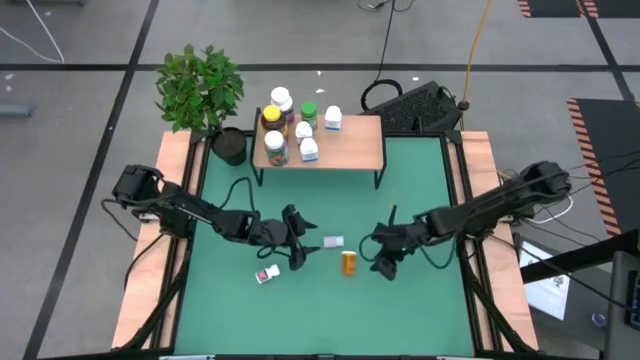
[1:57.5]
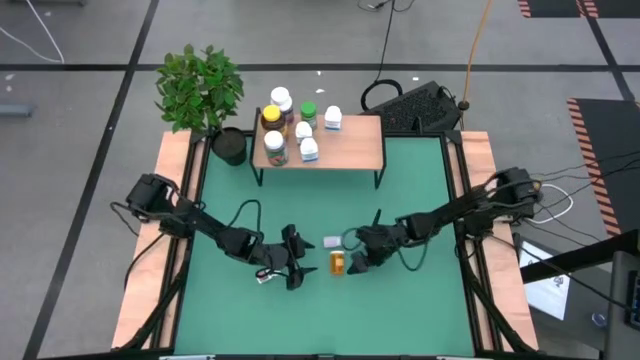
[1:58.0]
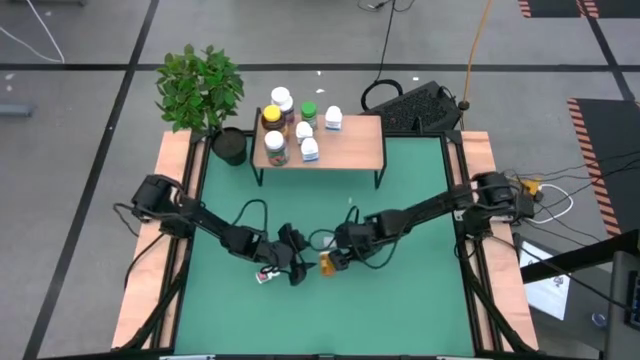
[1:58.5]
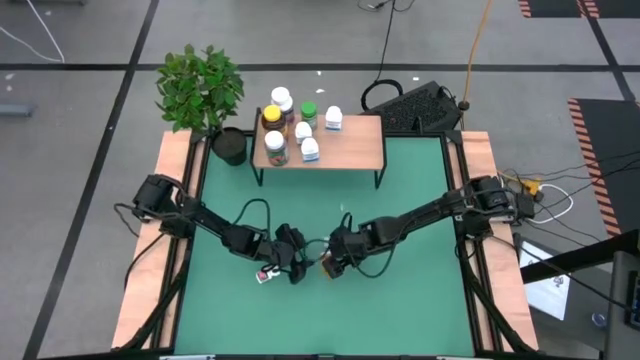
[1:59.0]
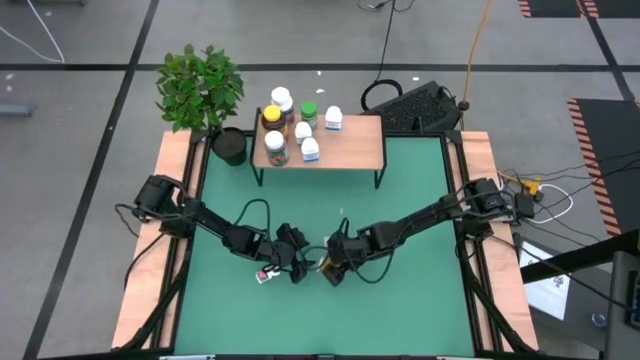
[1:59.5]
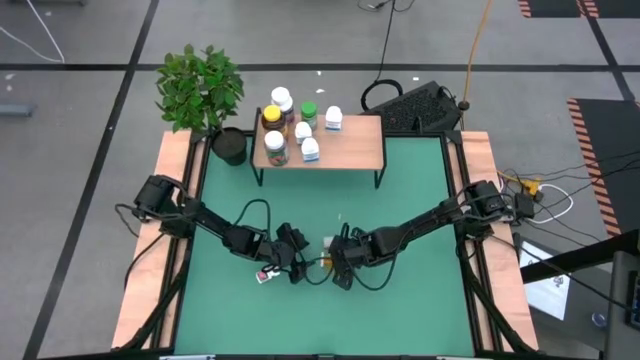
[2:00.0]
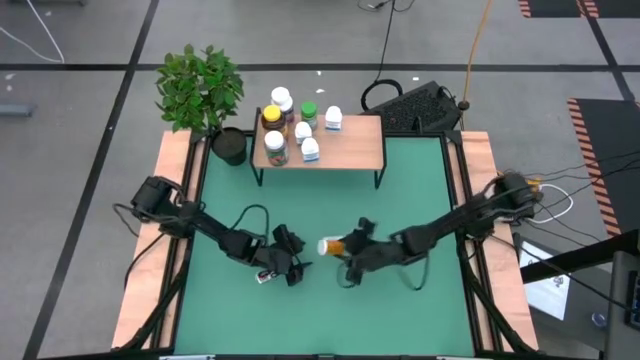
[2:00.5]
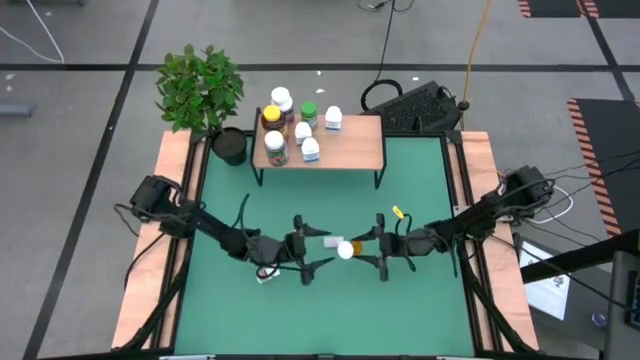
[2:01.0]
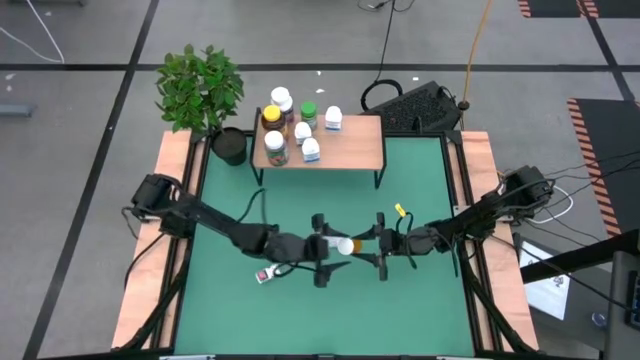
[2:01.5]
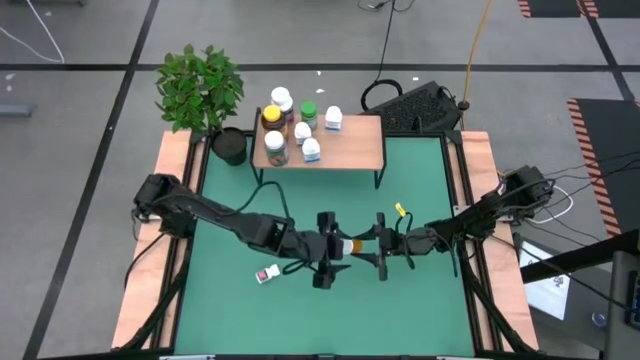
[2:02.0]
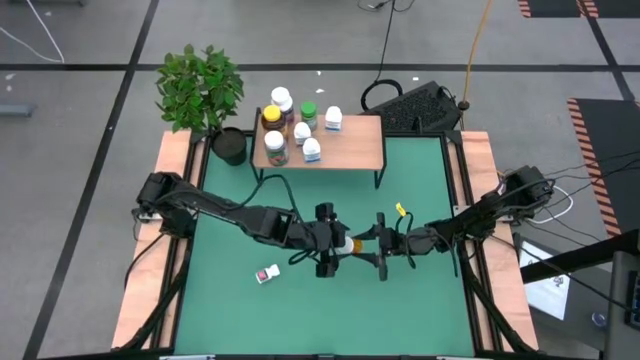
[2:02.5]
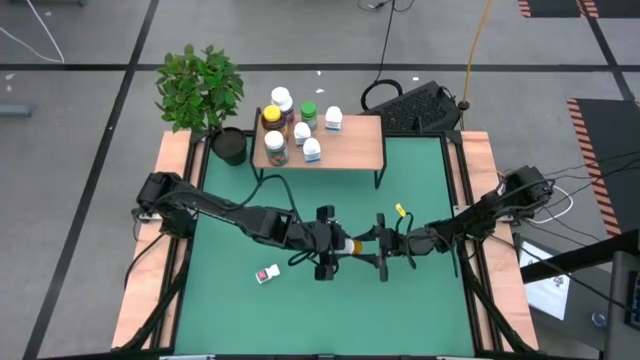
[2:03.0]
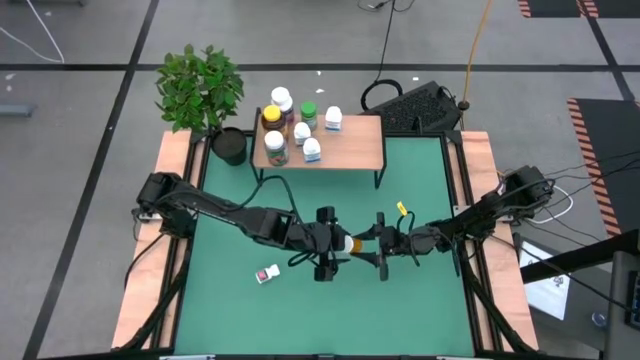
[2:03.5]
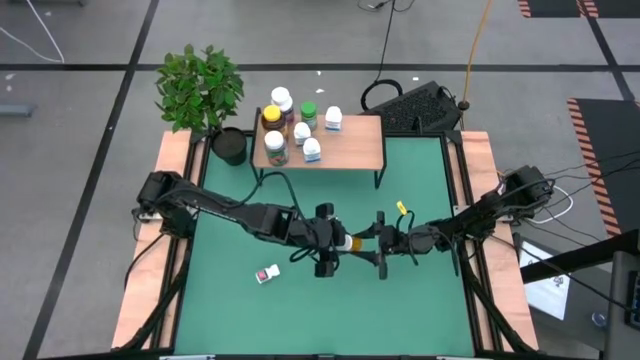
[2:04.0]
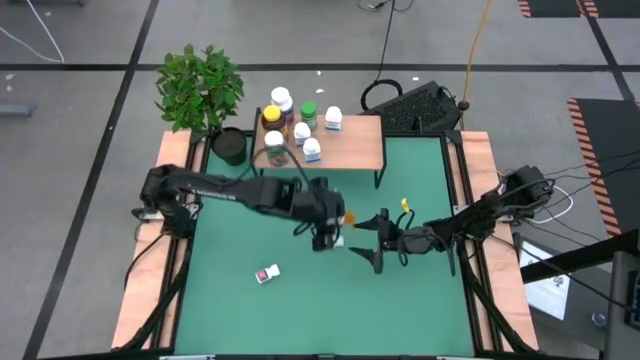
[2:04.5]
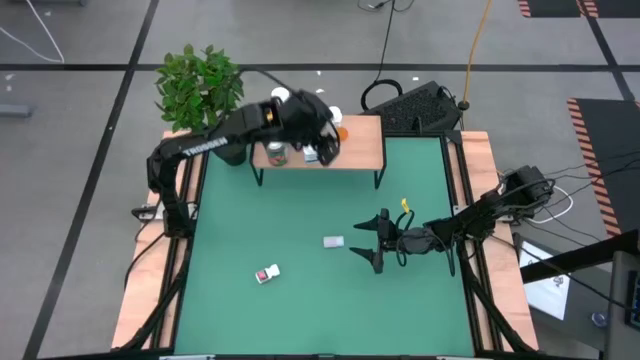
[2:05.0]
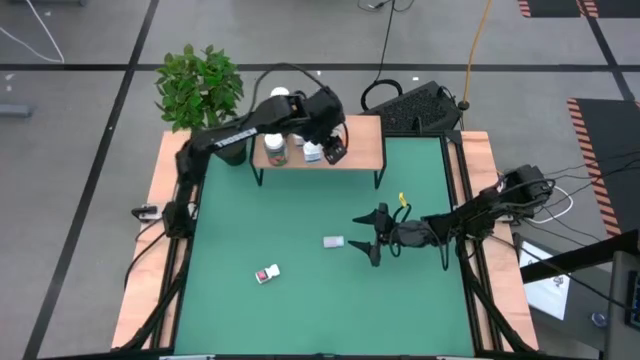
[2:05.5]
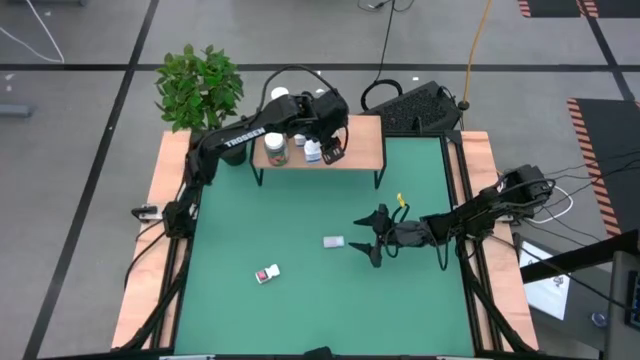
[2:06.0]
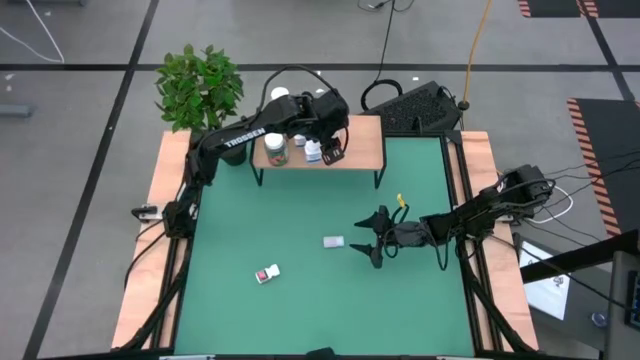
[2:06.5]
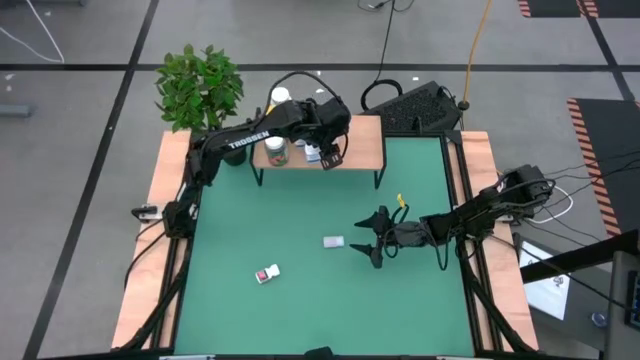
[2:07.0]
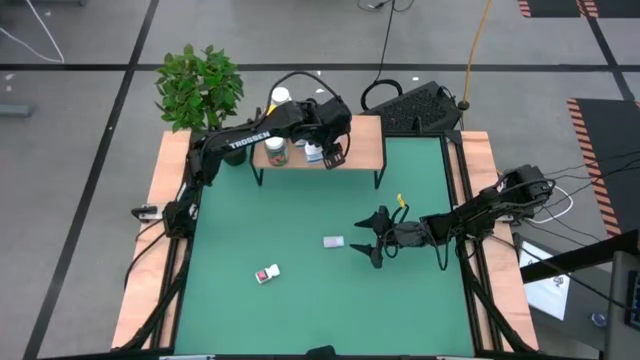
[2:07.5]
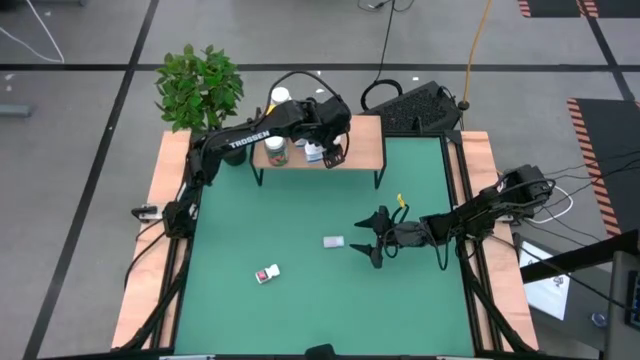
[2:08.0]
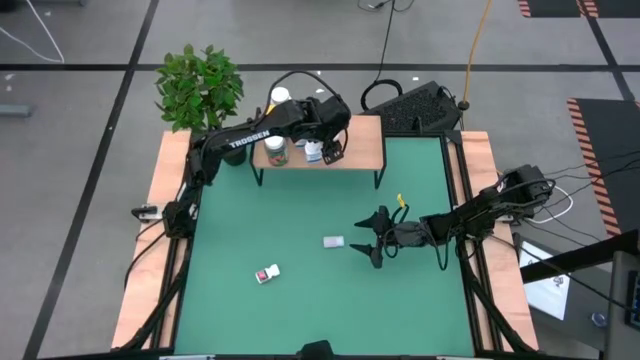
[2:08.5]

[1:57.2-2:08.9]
Task: Pick and place medicine bottles onto shelf by color
Put the orange pill bottle on the shelf

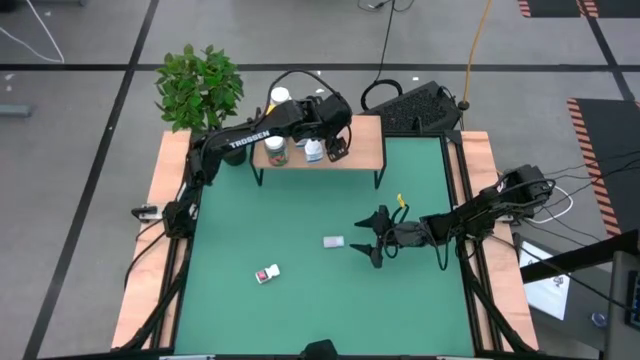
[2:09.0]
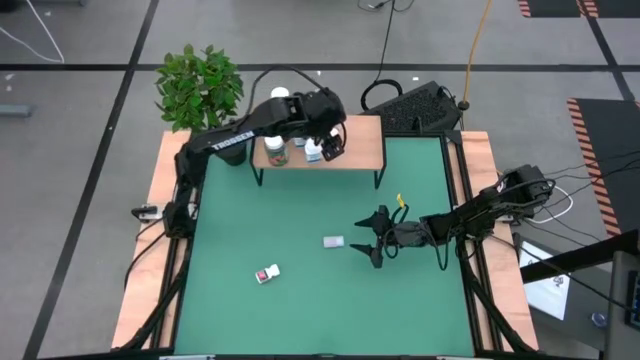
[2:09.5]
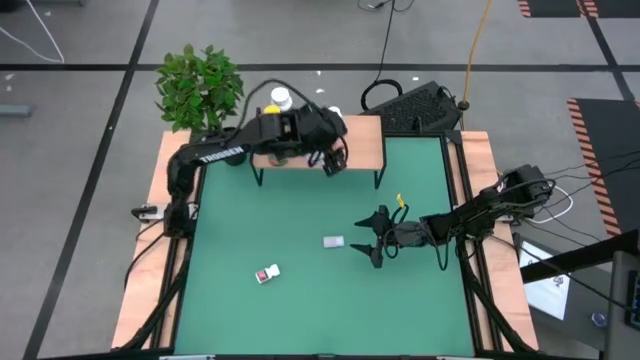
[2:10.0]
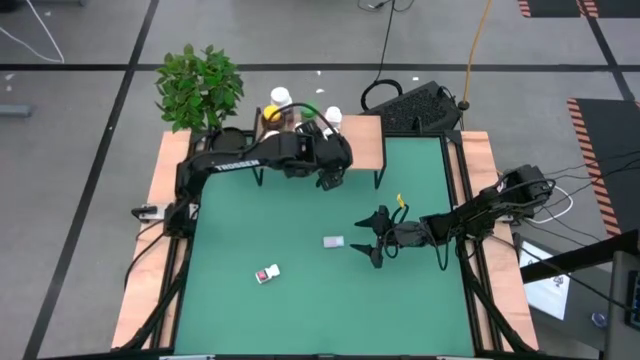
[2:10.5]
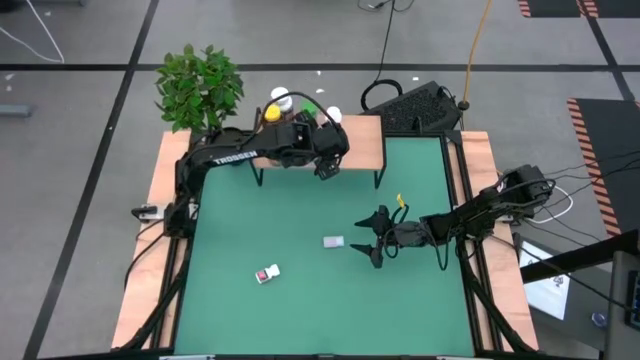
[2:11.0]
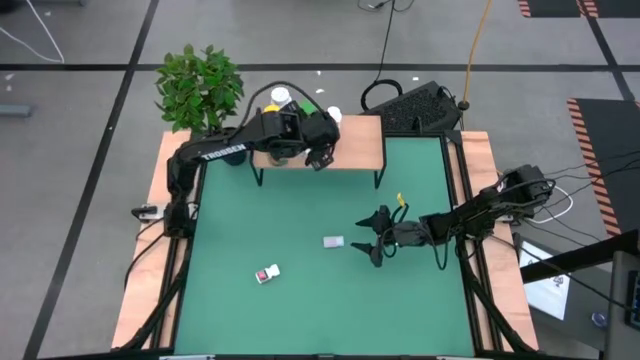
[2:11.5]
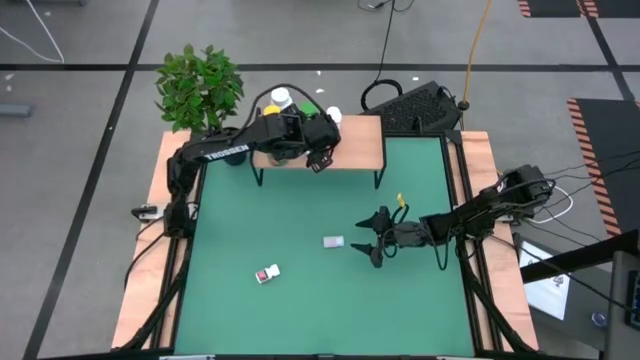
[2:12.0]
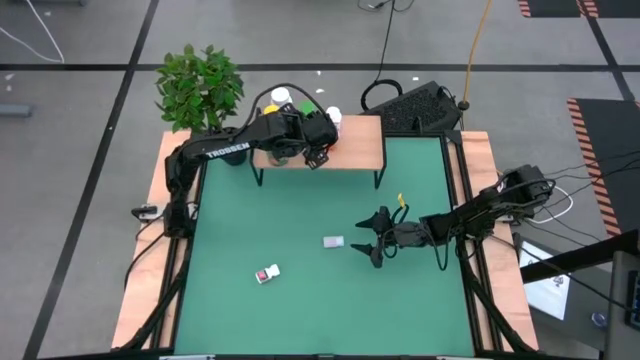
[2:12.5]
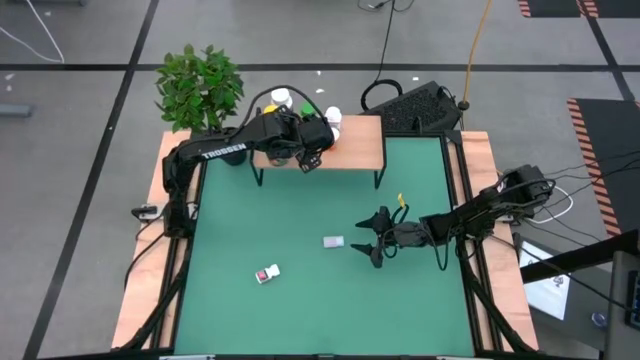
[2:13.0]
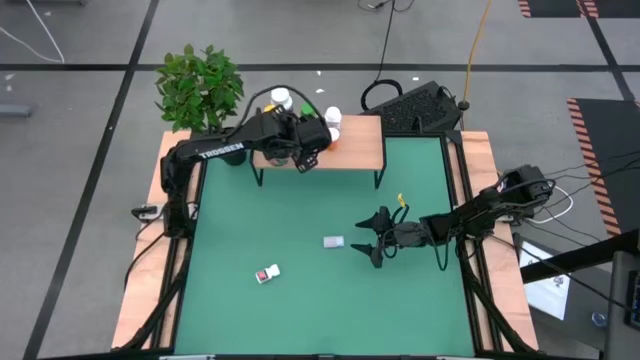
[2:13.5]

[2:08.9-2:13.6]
Adjust the small white pill bottle pill on the shelf

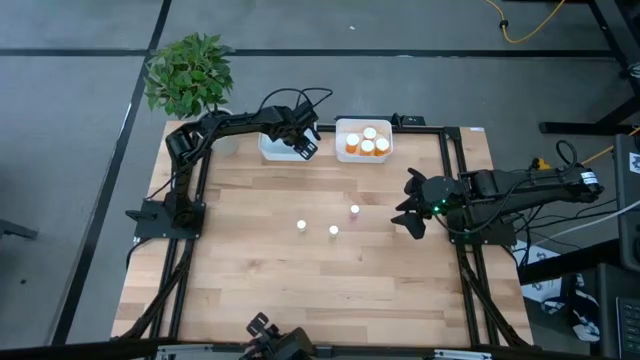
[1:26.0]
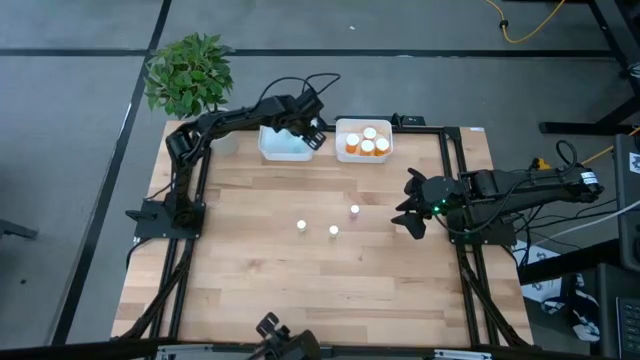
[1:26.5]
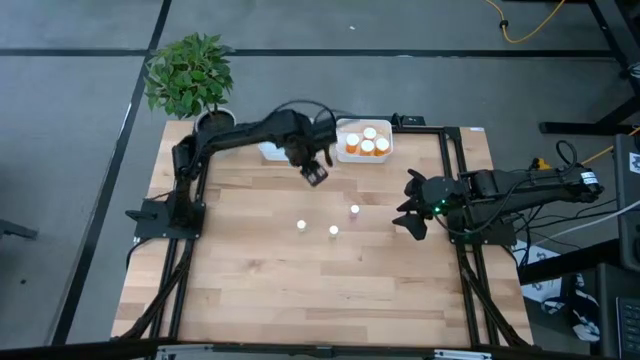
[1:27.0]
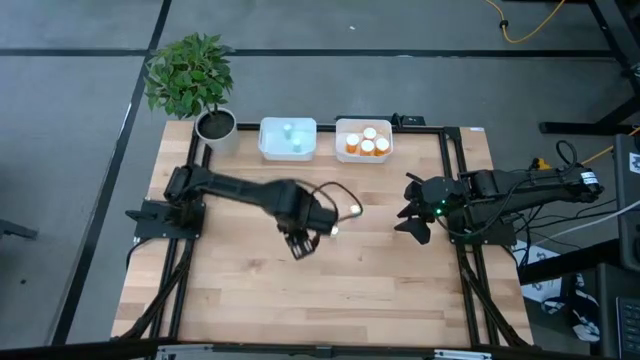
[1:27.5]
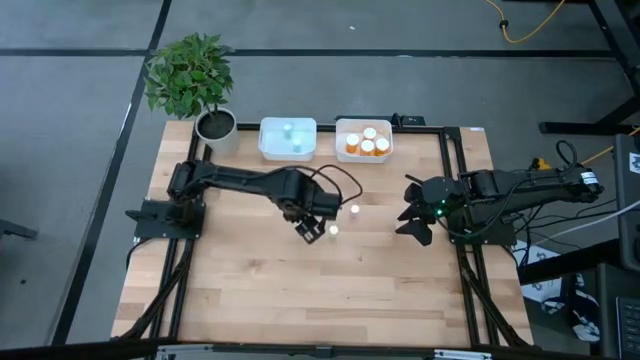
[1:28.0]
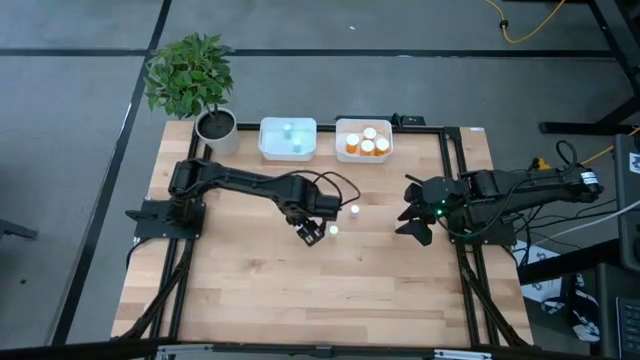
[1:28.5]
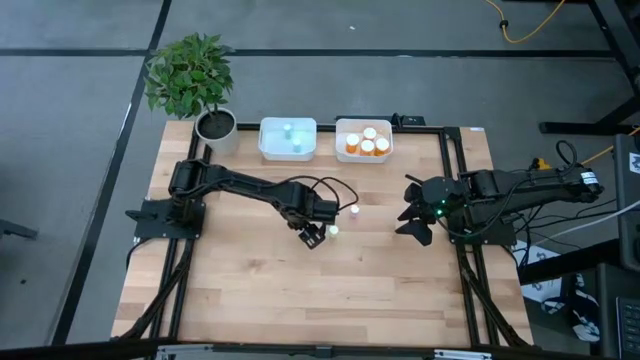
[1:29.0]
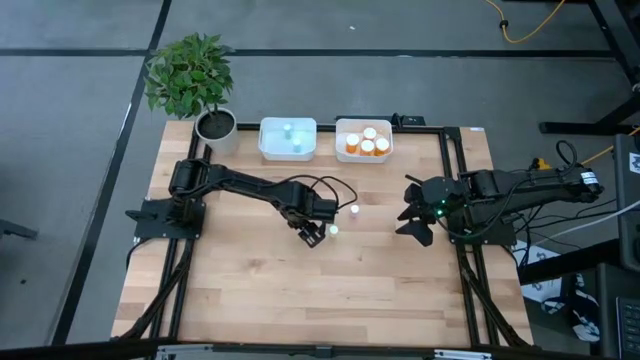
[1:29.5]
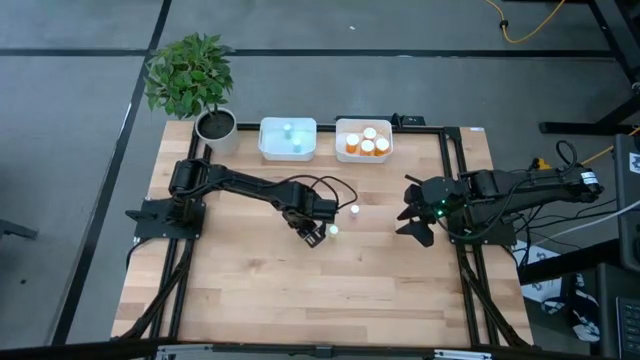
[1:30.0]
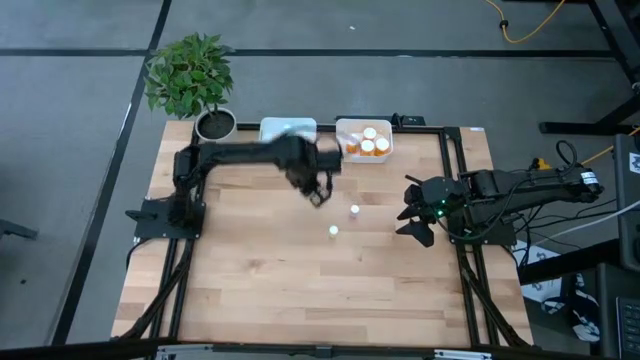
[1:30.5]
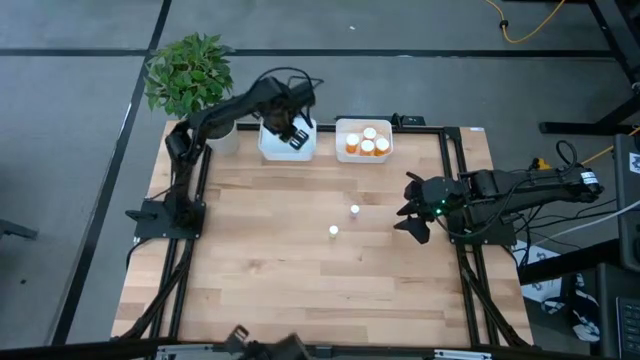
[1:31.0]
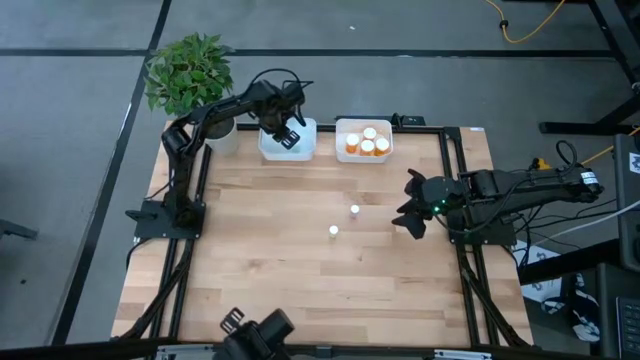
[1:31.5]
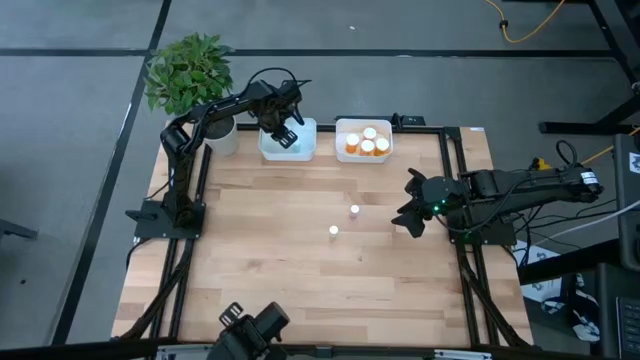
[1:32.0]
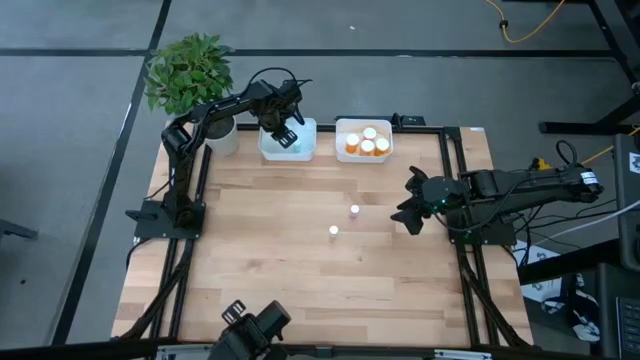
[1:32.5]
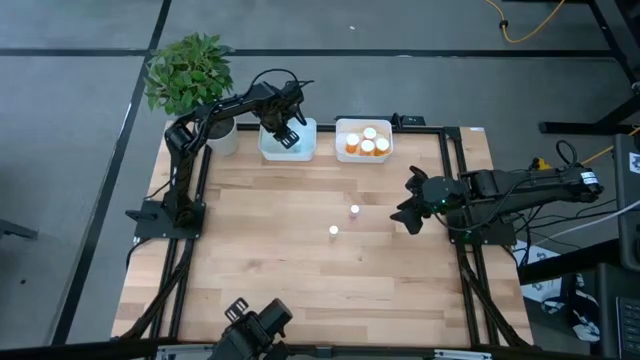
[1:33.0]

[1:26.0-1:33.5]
Task: Pick and place medicine bottles into bin by pill shape (circle, oval)
Put the left yellow tablet bottle into the left white bin
